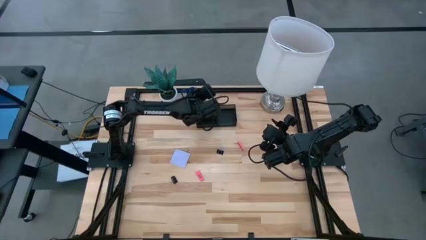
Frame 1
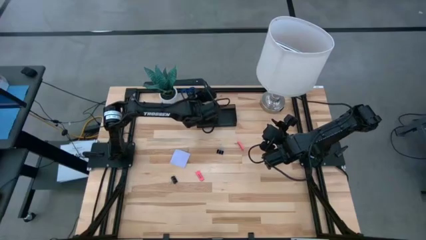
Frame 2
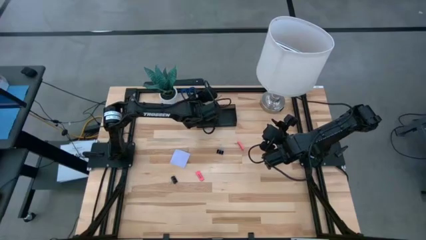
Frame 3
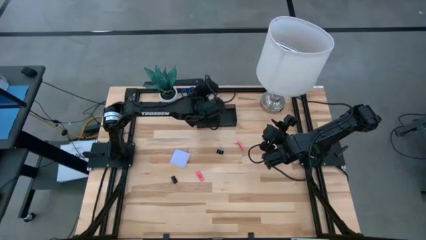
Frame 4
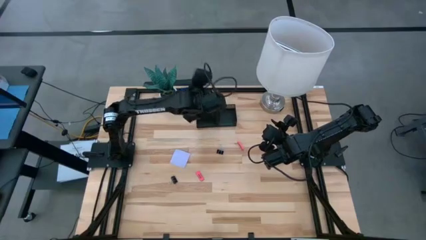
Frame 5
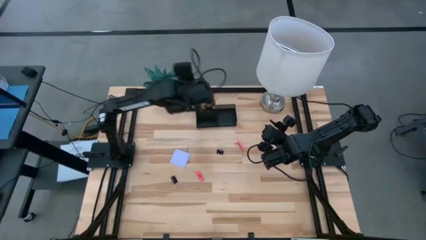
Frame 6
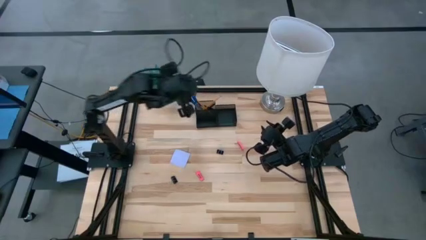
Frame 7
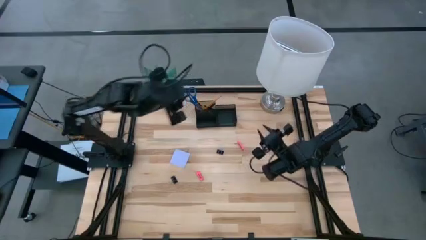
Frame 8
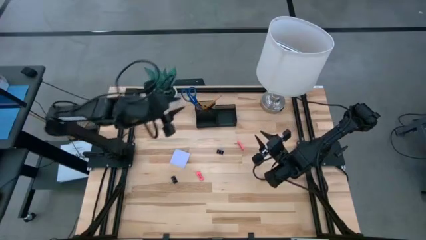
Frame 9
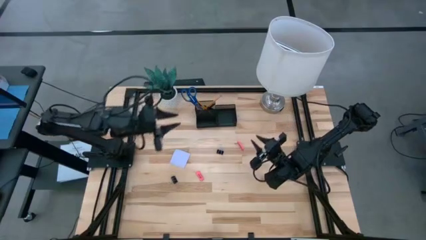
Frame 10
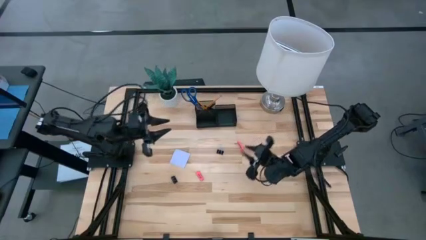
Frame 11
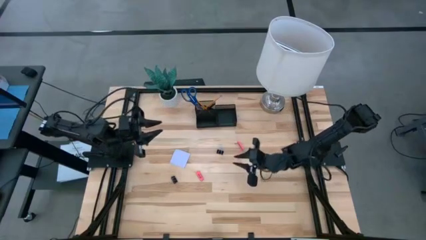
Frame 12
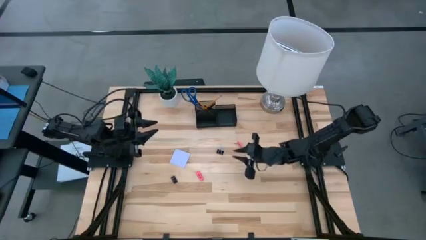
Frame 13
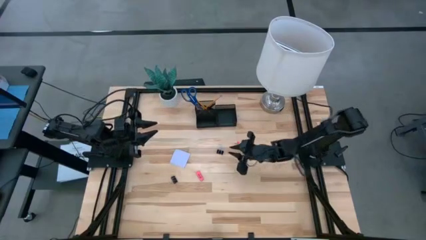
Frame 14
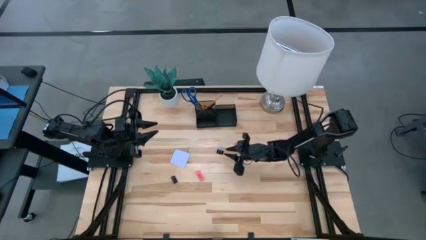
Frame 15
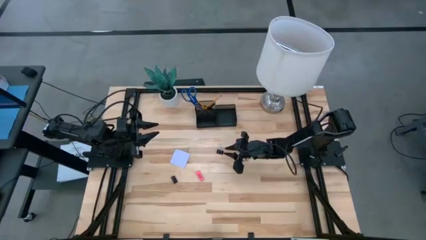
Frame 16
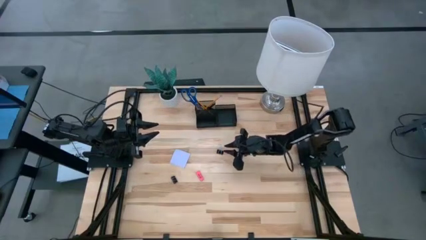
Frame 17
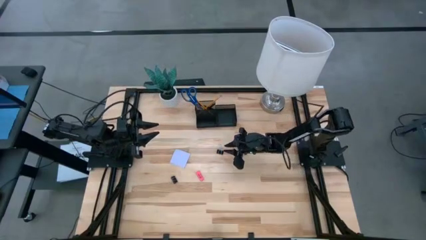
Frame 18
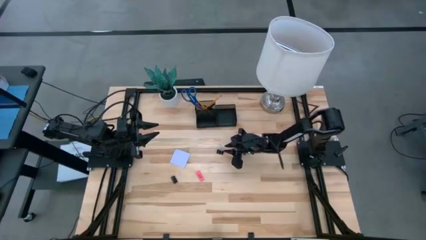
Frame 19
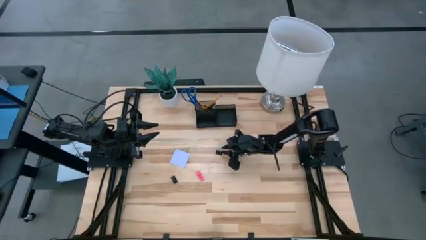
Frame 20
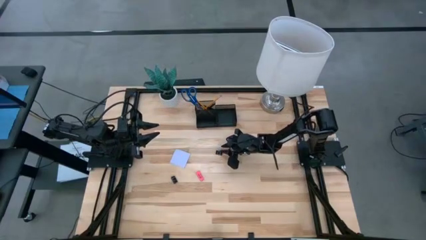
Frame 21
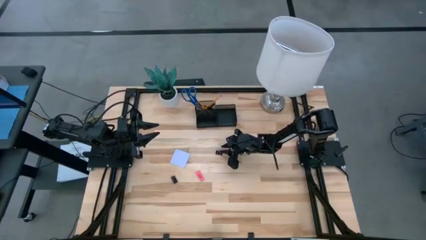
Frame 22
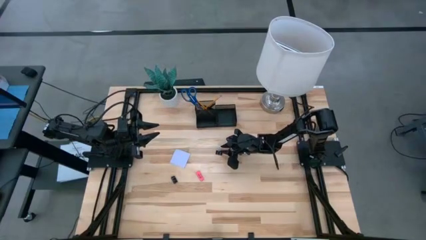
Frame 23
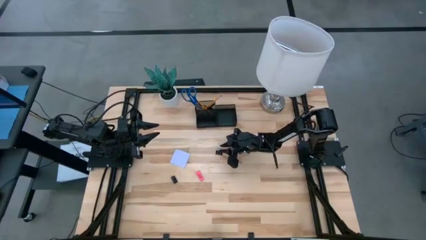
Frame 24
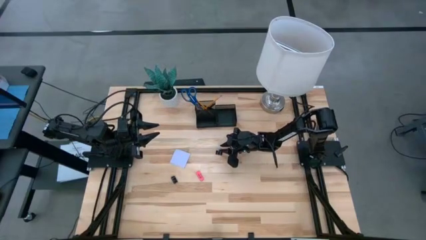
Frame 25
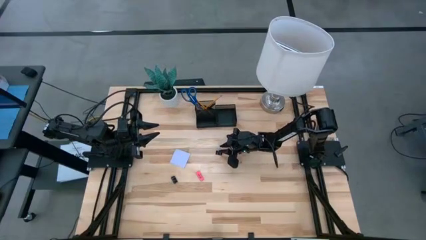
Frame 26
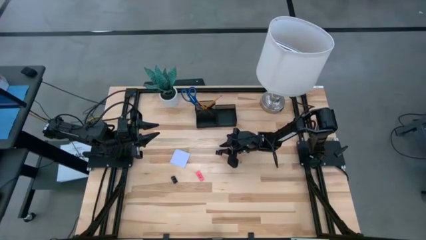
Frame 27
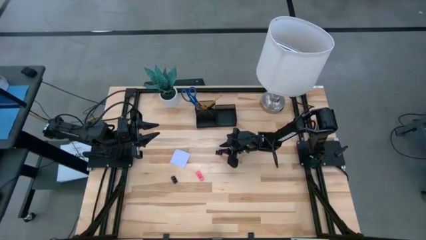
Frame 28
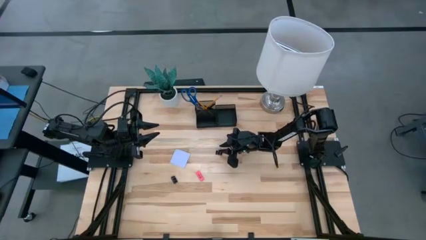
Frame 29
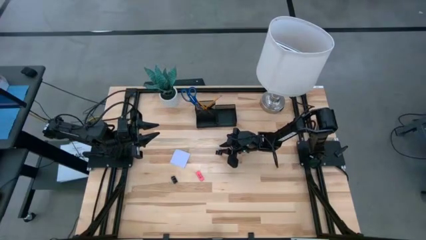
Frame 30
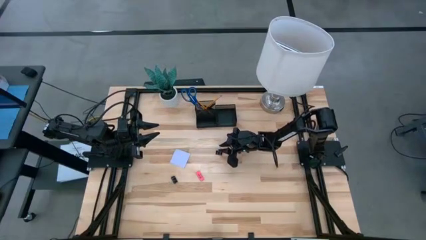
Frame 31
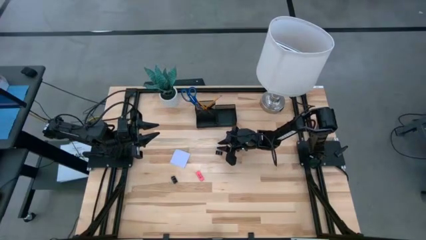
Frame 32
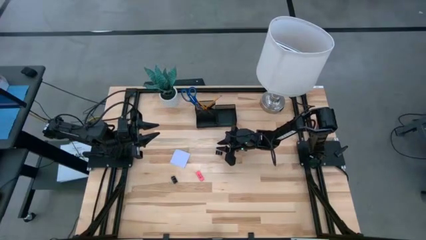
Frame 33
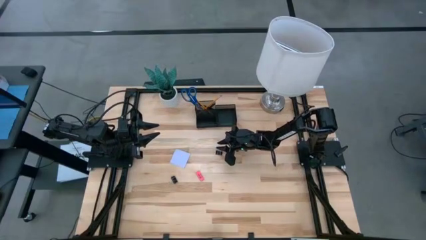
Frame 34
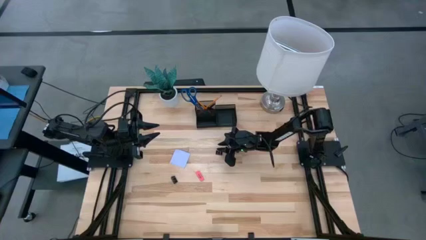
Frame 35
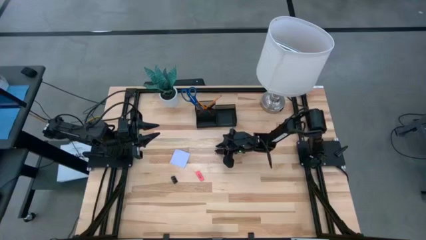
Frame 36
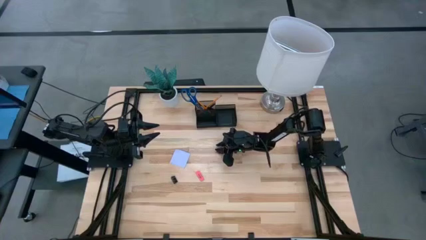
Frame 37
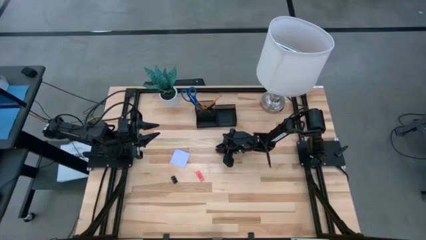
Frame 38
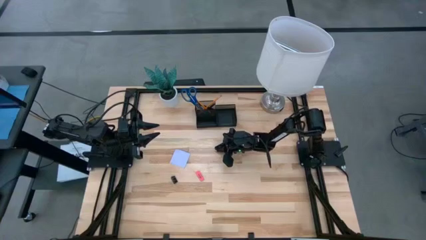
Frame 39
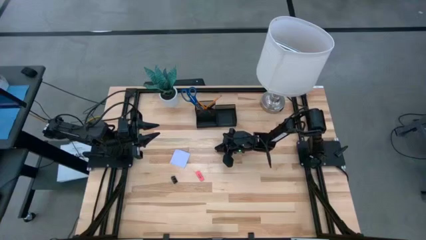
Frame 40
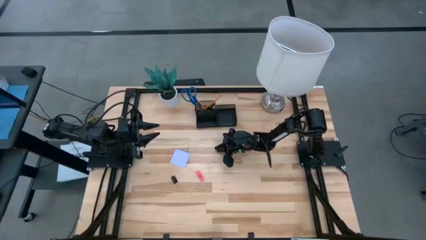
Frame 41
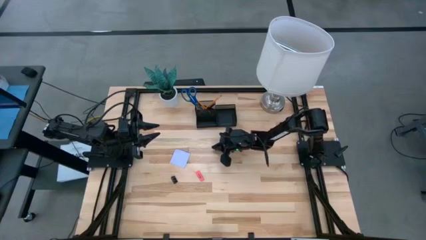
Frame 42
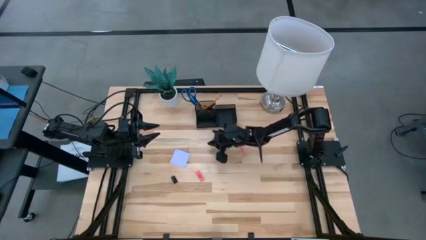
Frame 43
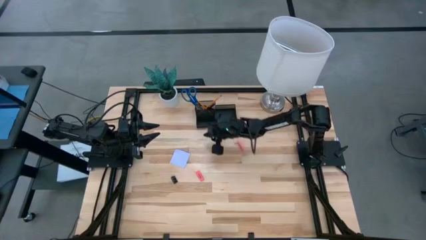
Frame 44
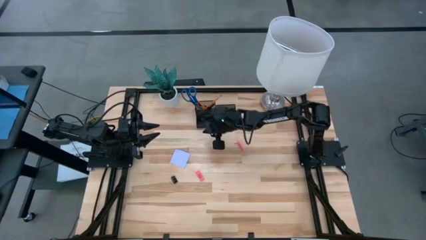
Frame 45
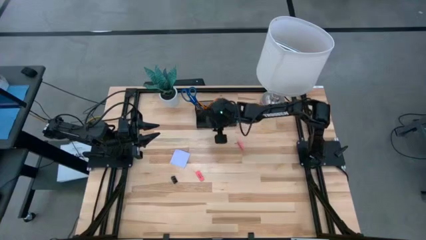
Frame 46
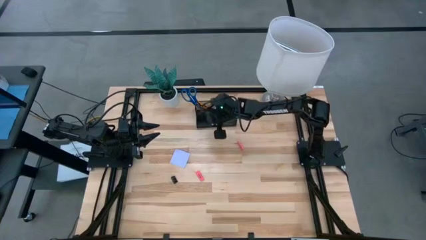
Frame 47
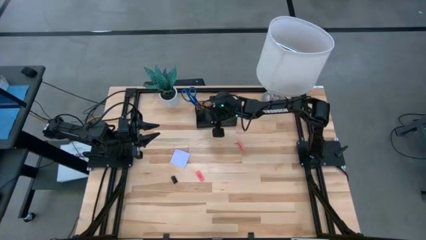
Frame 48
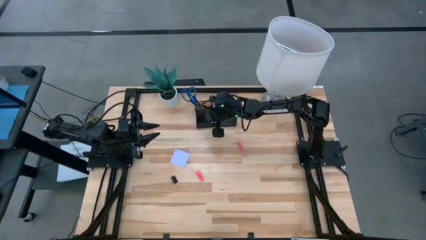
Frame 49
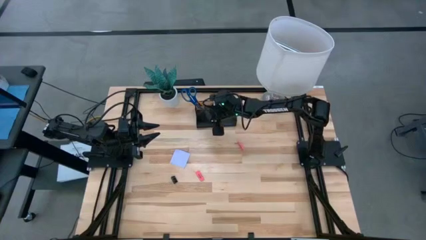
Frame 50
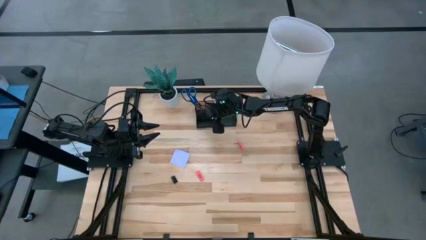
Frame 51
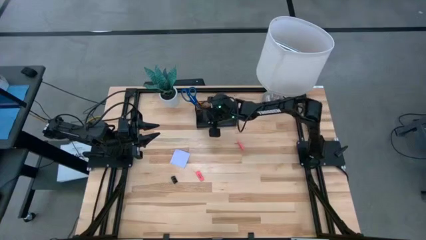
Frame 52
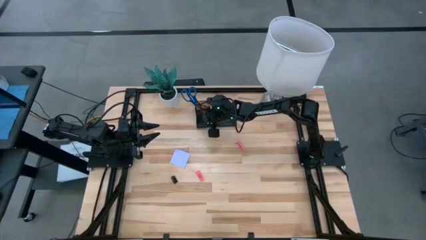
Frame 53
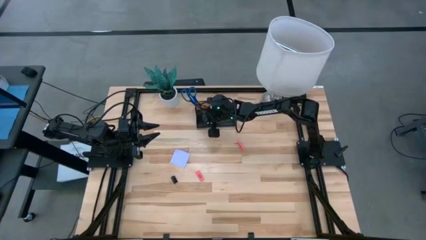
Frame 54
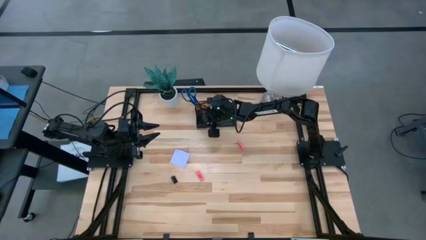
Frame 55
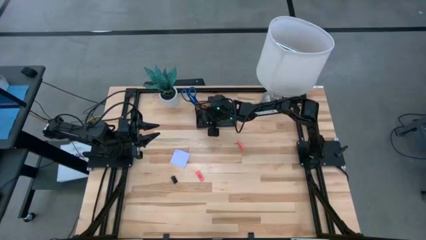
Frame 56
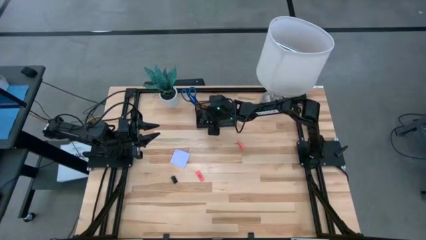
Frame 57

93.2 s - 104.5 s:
Task: Pick and place office supplies into organizer
Put the top black binder clip into the desk organizer

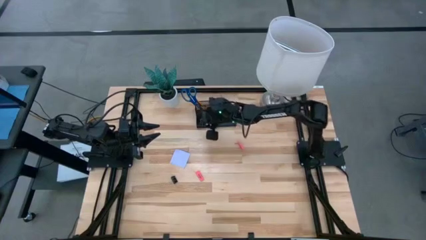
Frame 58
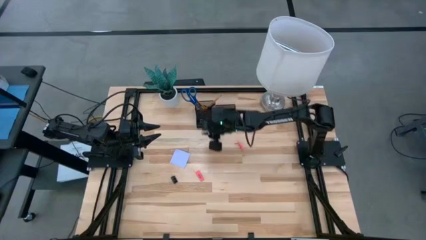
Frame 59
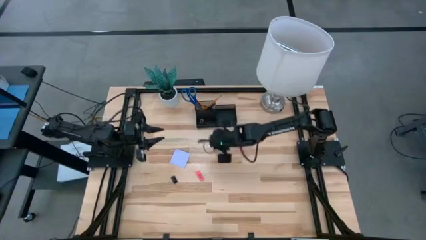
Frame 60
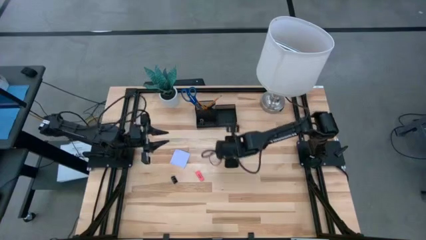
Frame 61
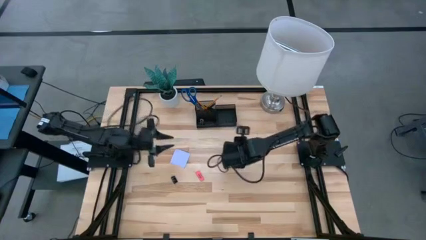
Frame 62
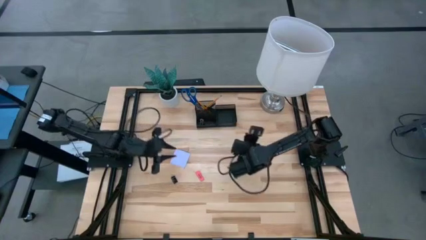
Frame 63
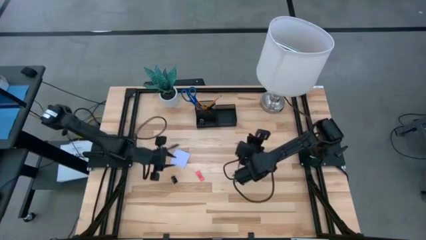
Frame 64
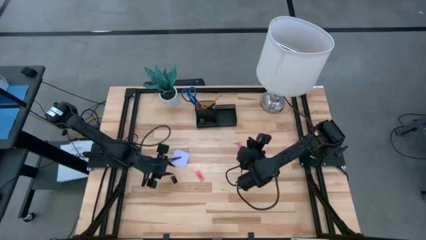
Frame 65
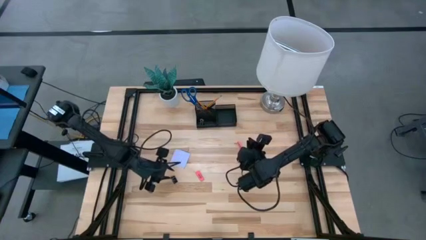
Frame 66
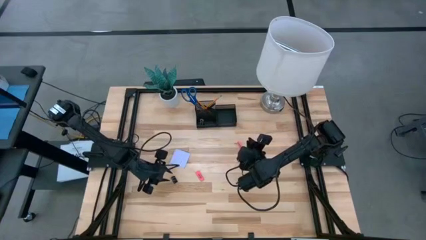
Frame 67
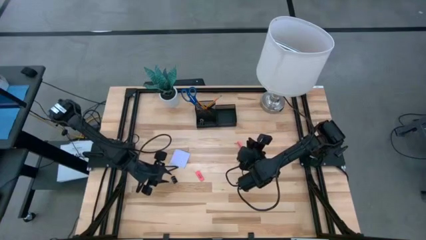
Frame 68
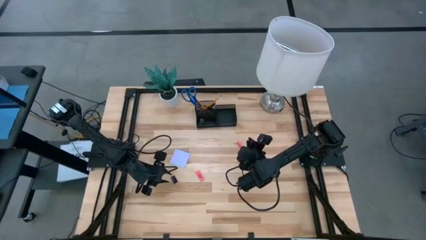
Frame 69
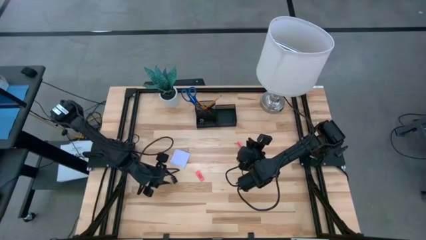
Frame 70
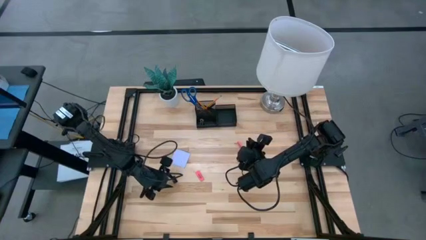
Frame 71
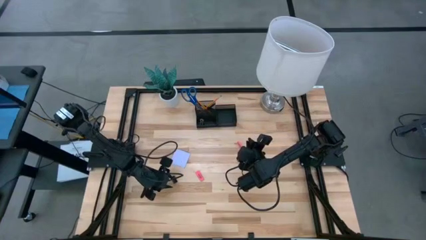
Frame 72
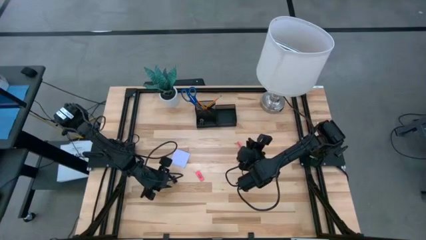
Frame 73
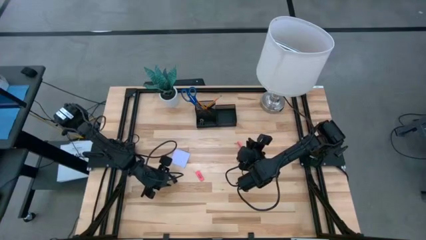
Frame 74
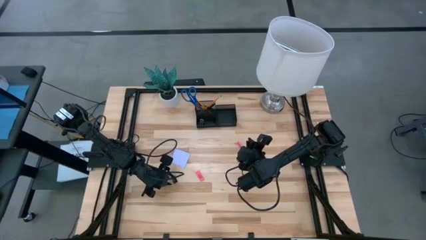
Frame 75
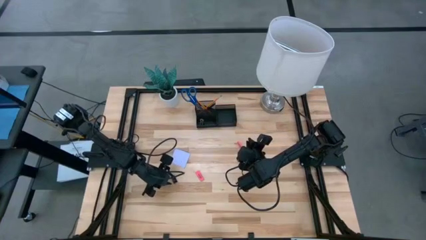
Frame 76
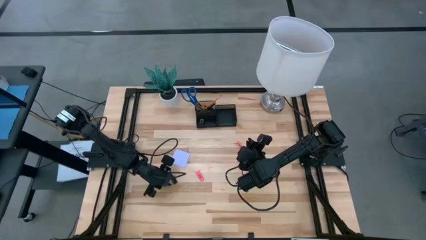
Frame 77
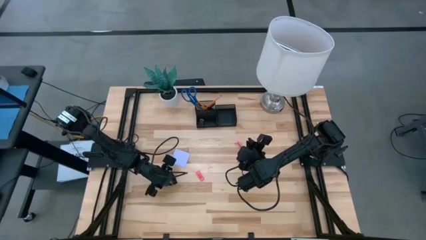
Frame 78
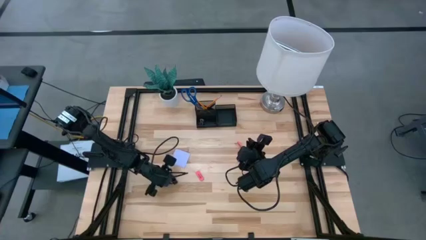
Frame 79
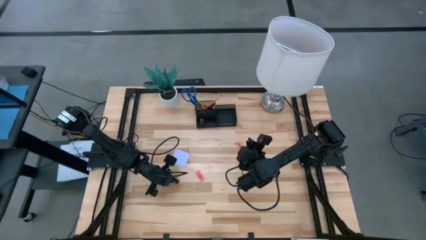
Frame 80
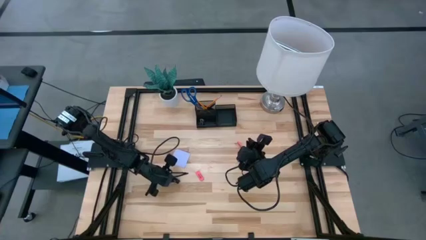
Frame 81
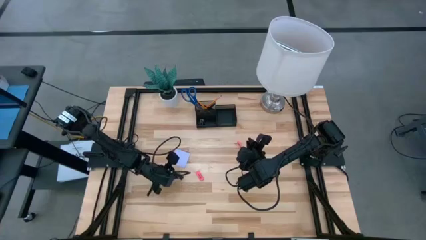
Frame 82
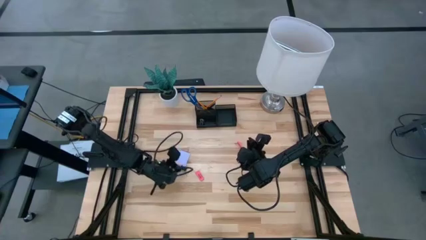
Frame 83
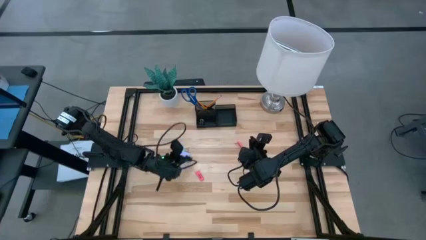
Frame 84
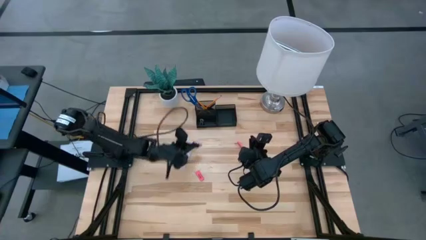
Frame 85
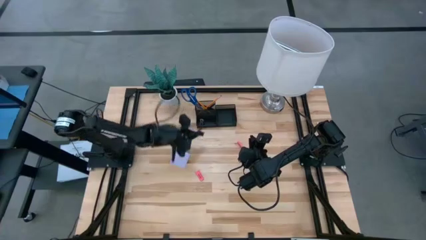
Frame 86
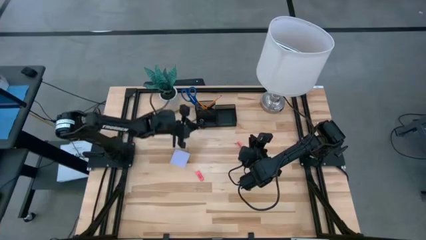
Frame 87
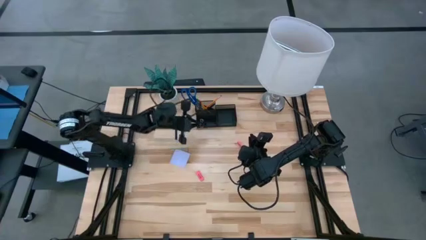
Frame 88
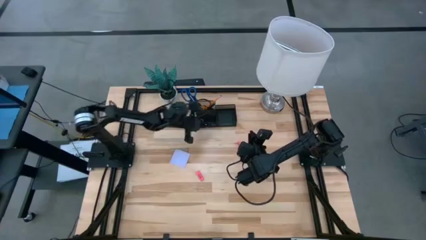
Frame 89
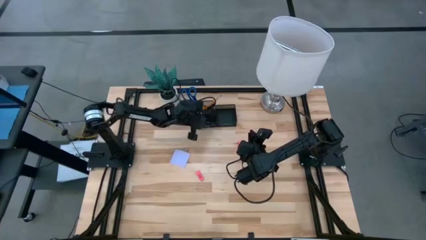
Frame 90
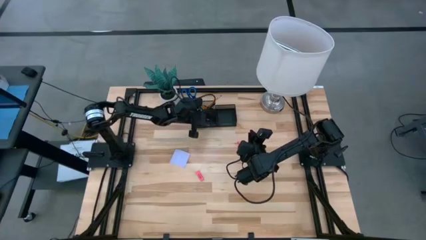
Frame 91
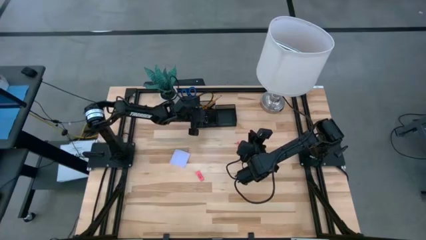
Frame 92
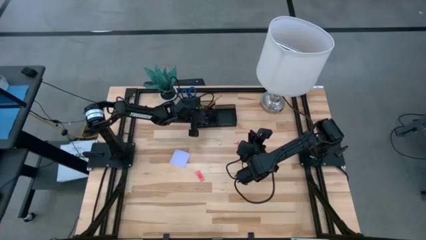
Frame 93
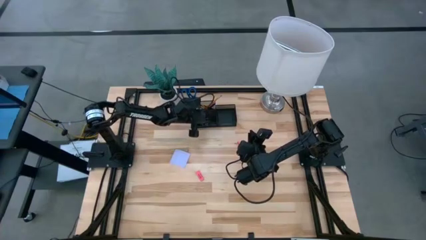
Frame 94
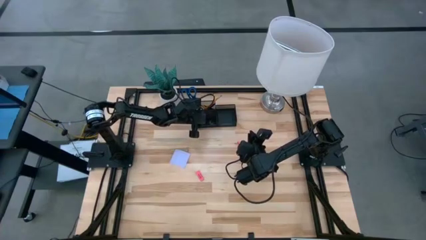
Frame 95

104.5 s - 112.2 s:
Put the black binder clip into the desk organizer
